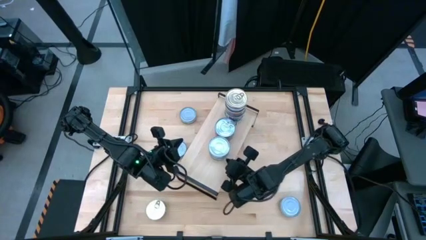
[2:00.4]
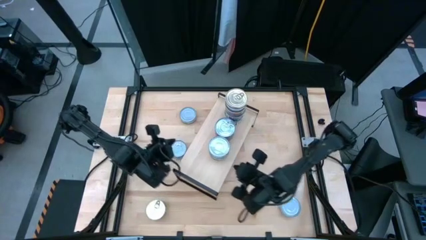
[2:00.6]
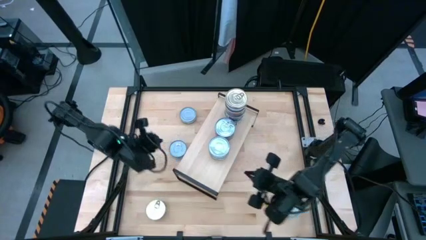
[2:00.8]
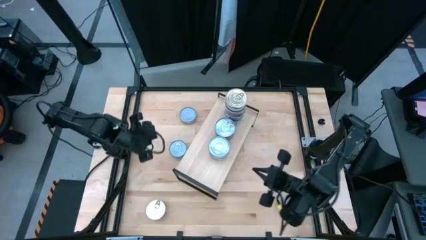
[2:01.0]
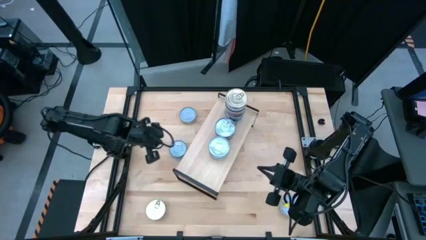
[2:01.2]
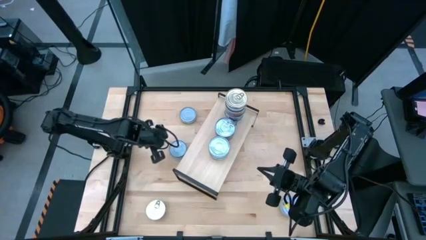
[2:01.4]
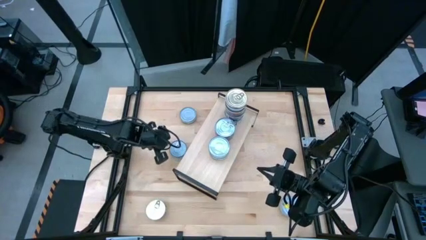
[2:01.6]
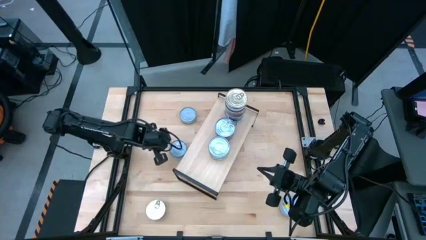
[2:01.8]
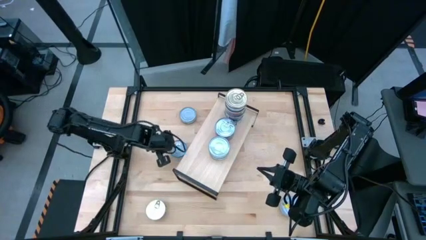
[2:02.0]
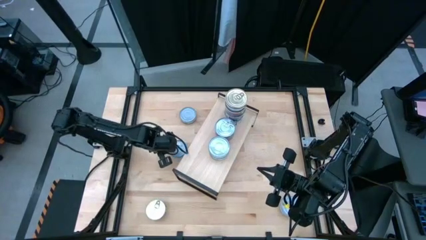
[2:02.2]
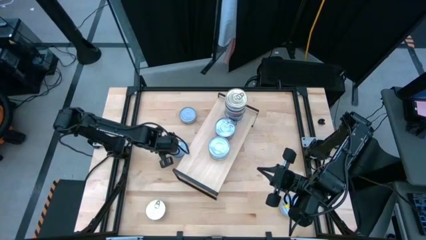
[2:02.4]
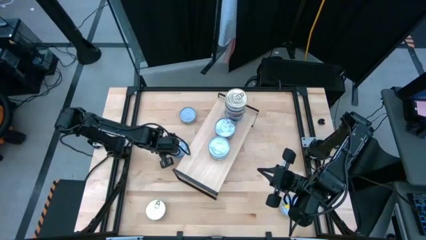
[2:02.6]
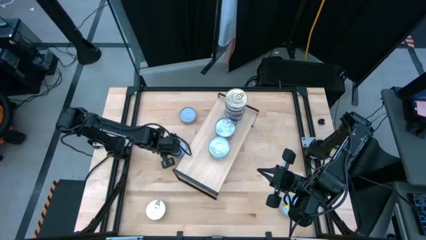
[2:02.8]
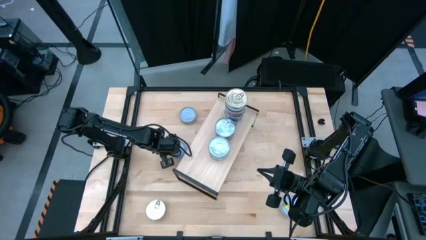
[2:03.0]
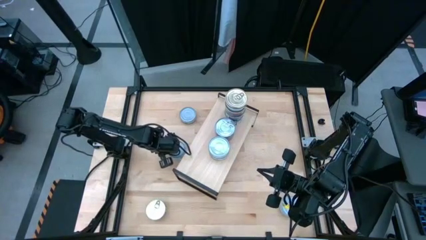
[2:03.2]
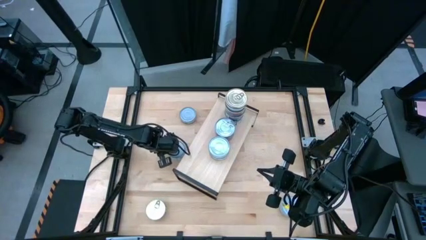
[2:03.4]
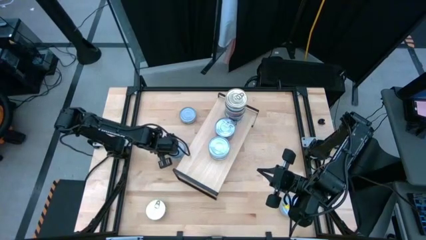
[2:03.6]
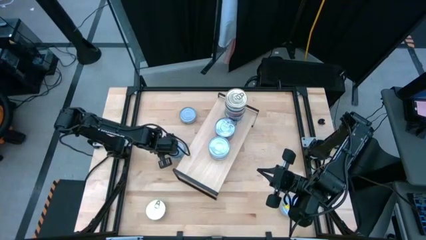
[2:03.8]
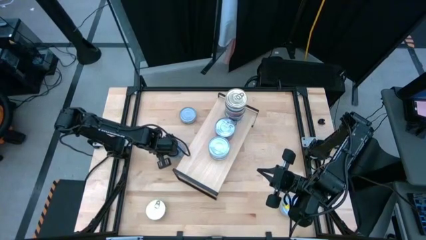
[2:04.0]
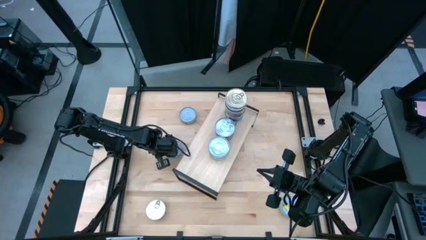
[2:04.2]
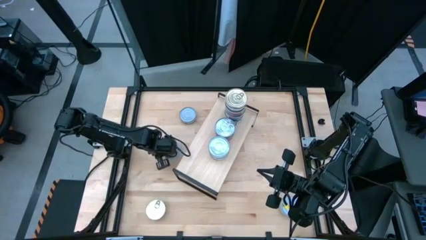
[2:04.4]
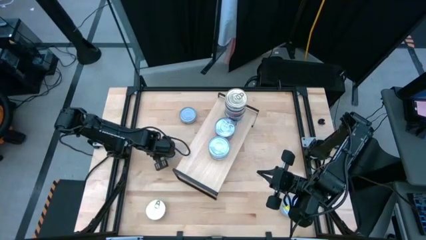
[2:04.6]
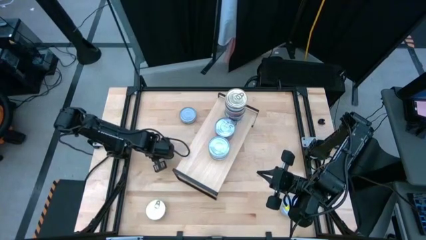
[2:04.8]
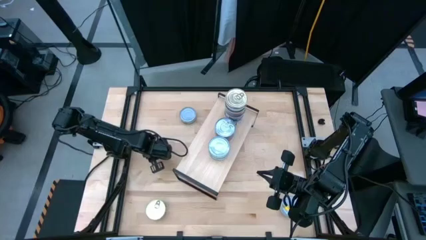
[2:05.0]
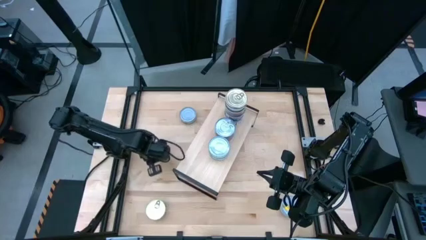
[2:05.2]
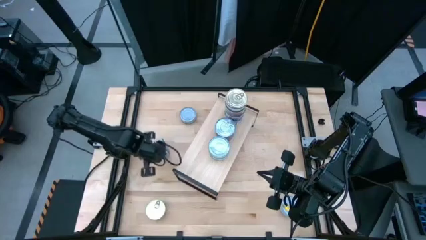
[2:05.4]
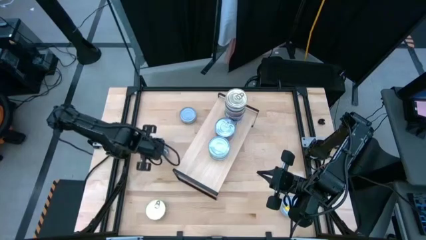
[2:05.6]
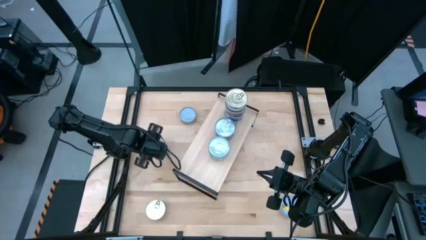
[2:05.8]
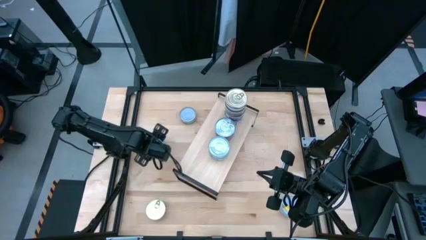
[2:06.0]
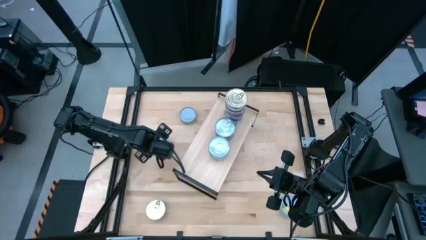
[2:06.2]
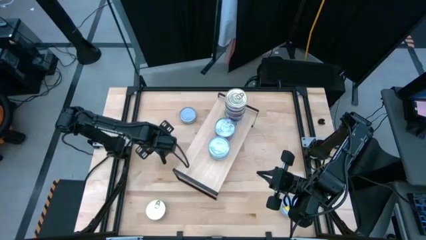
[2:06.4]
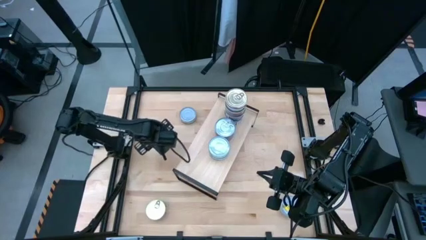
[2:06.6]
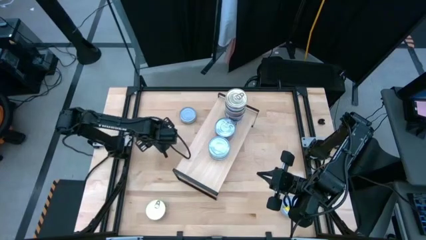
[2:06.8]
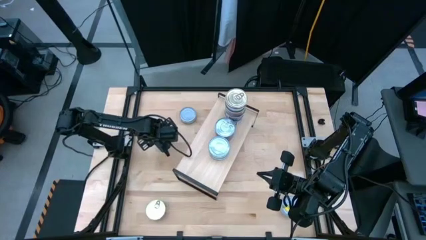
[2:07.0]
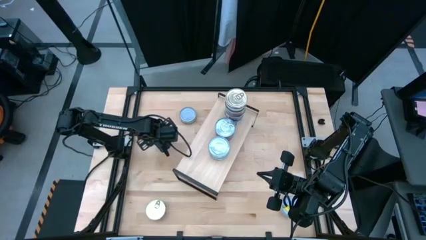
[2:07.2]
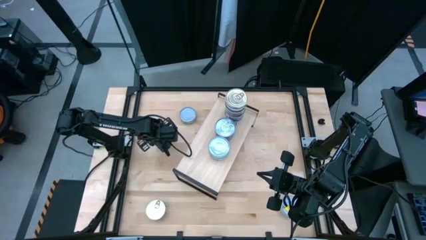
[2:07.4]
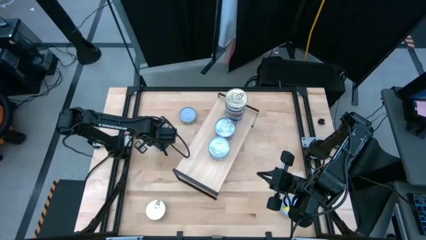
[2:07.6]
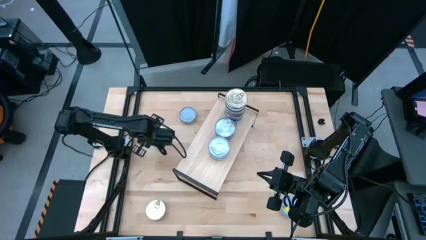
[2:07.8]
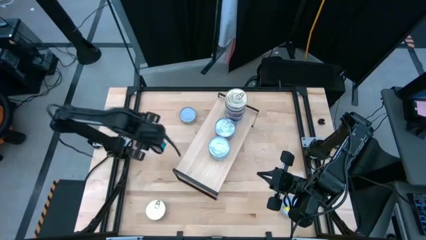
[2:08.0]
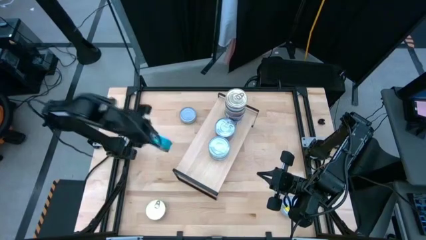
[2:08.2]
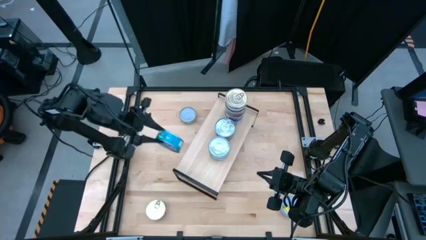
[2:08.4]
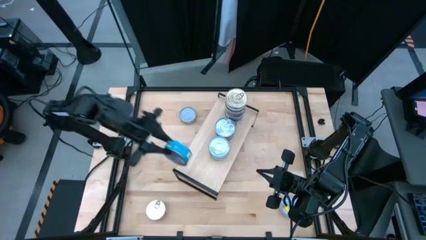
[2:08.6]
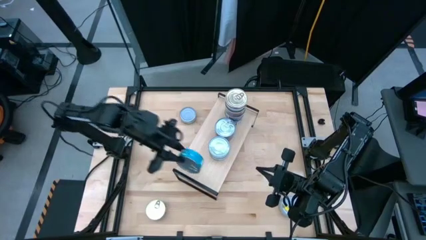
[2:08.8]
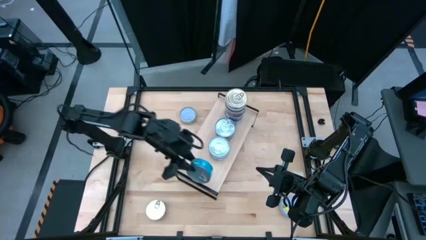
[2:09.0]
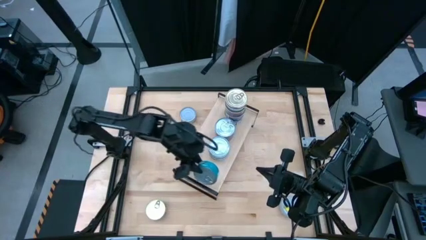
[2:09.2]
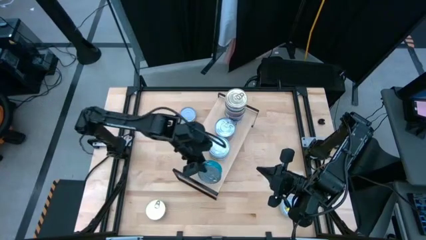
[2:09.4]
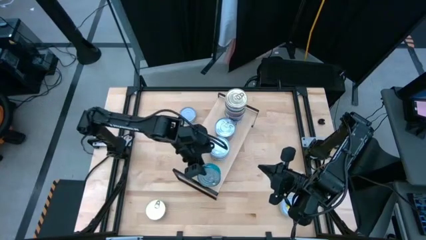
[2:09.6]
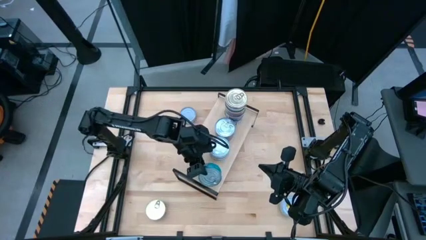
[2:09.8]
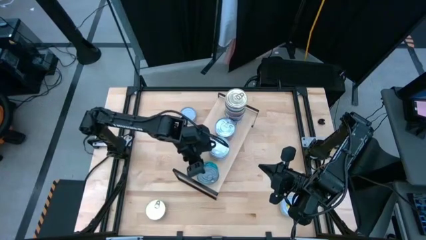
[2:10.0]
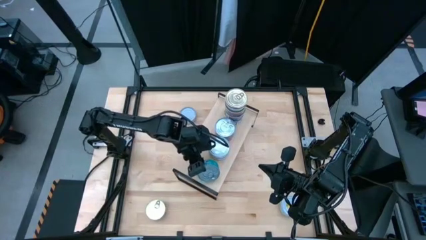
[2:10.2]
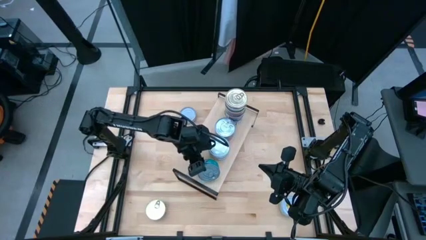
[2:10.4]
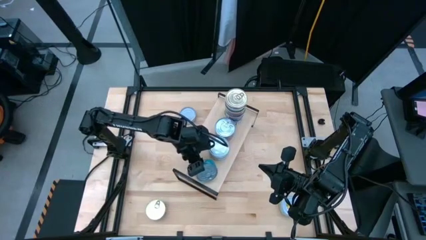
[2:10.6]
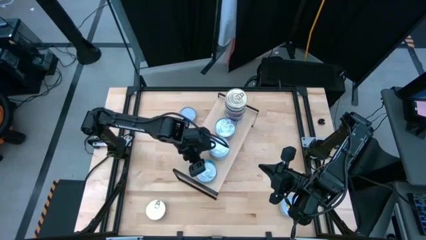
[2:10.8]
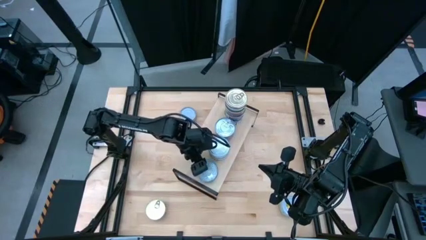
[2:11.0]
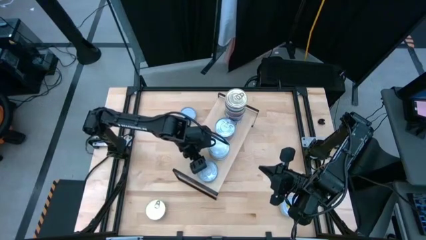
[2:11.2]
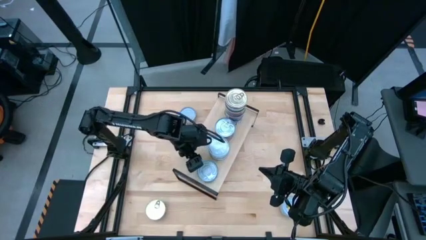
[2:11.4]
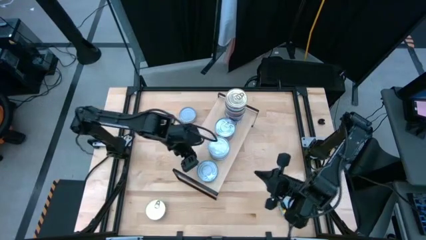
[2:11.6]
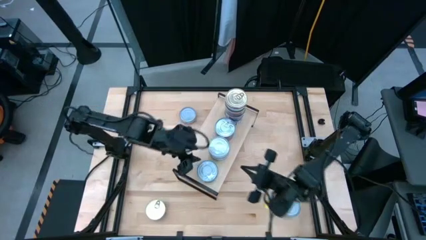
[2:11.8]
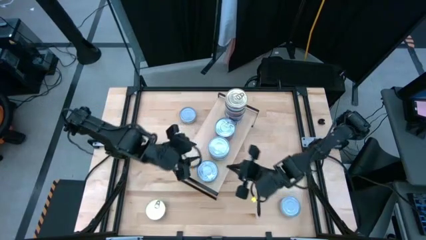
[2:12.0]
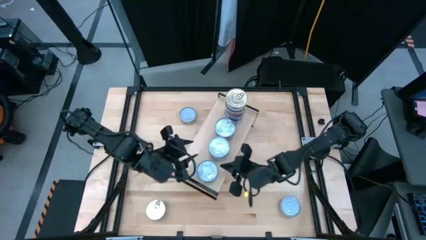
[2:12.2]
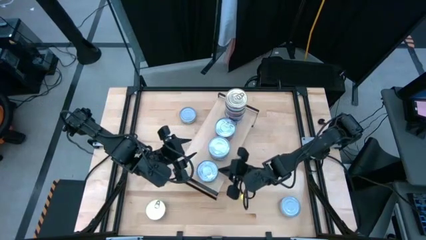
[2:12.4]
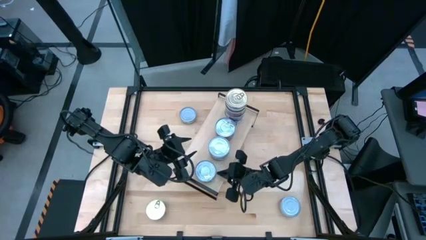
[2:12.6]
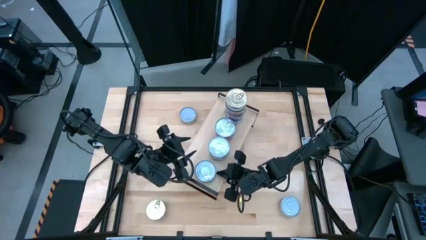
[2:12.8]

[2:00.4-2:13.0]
Task: Stack canned seafood by type on shelf
Put the light blue tuna can on the shelf

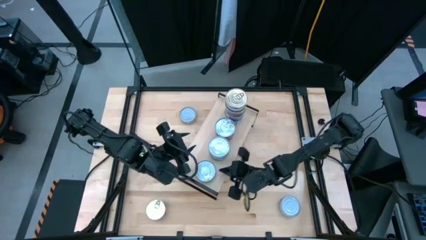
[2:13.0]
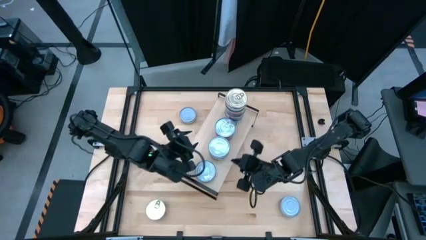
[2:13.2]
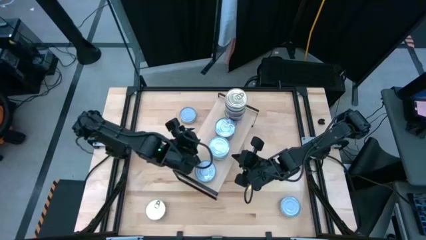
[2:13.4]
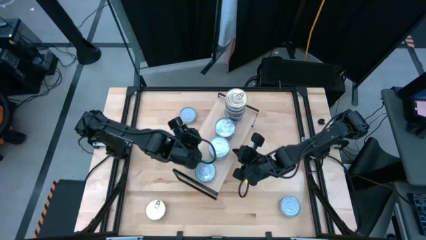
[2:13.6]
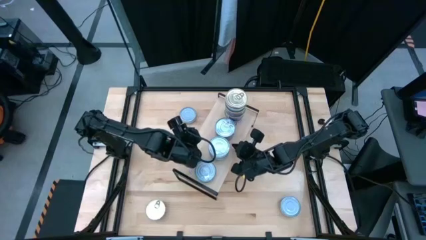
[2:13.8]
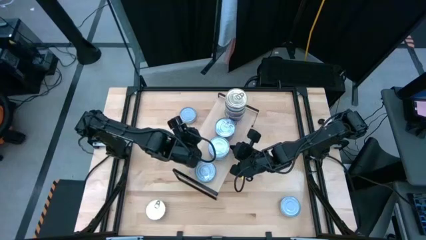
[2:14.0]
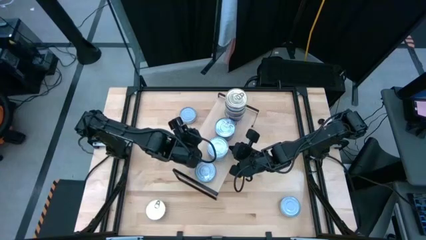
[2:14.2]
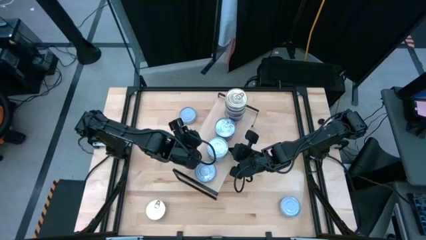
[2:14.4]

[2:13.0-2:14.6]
Adjust the green tuna cans on the shelf

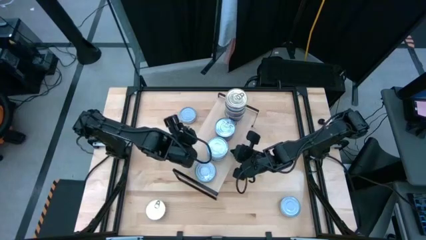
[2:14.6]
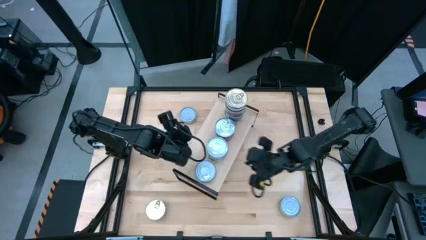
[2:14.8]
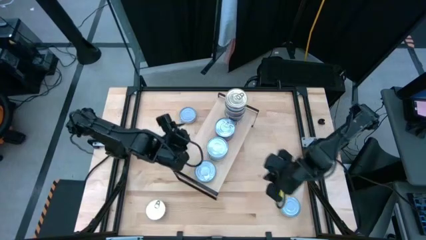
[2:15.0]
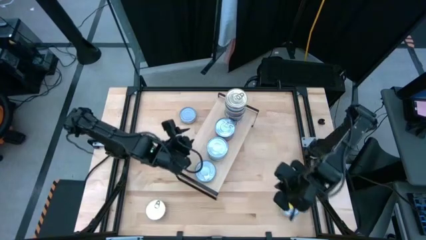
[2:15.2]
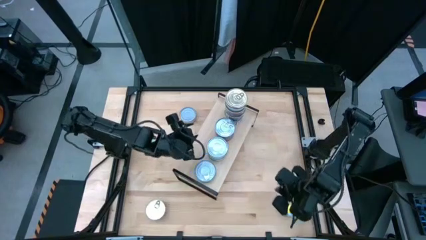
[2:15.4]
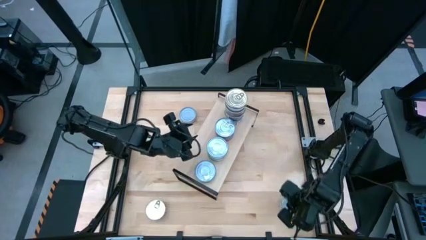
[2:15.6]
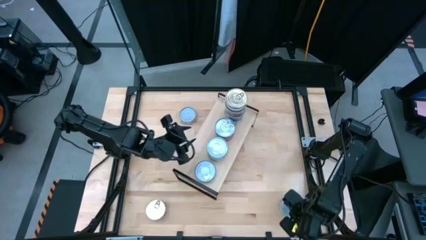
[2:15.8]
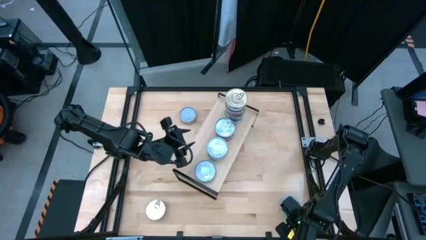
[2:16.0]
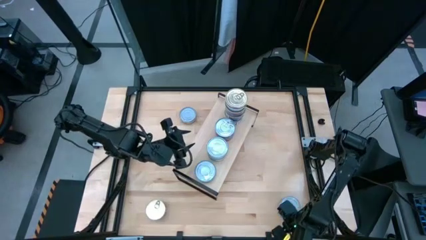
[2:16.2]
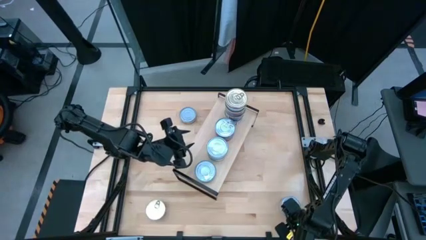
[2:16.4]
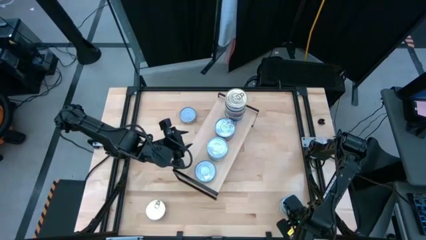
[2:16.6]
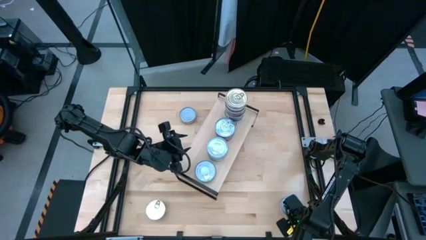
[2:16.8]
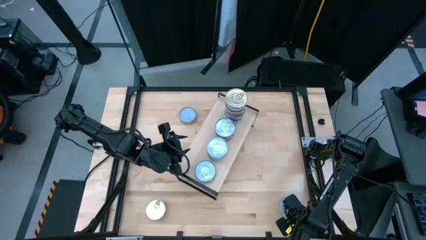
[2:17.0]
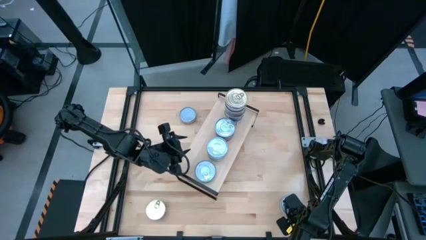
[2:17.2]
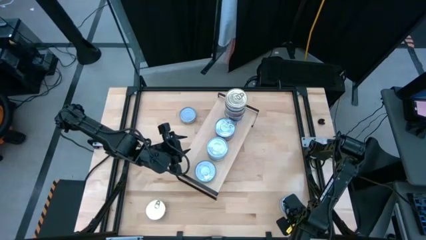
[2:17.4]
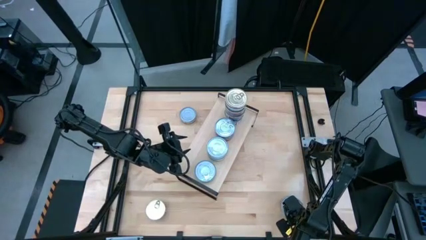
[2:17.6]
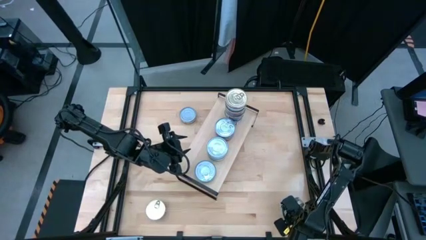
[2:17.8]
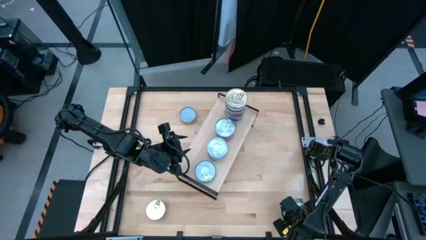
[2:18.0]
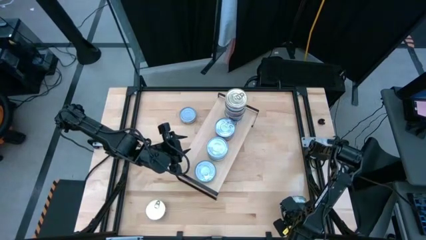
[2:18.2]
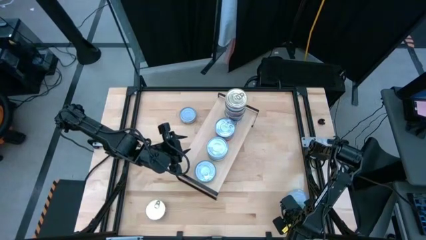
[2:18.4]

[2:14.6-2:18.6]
Stack the green tuna can on top of the green tuna can on the shelf
